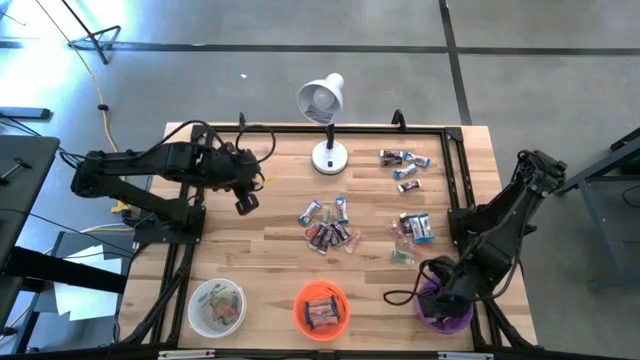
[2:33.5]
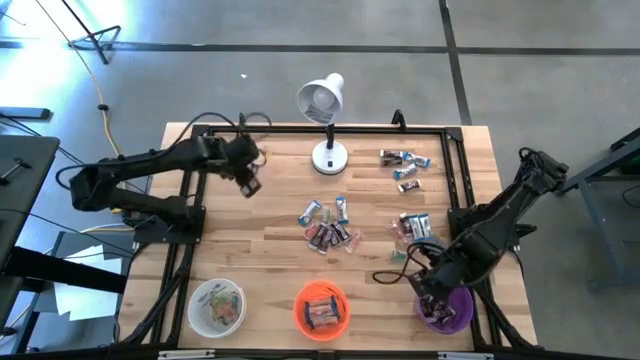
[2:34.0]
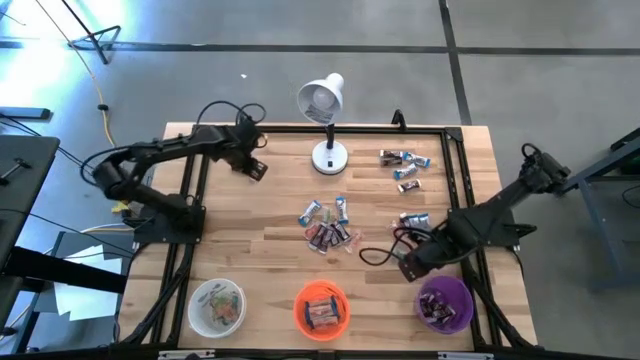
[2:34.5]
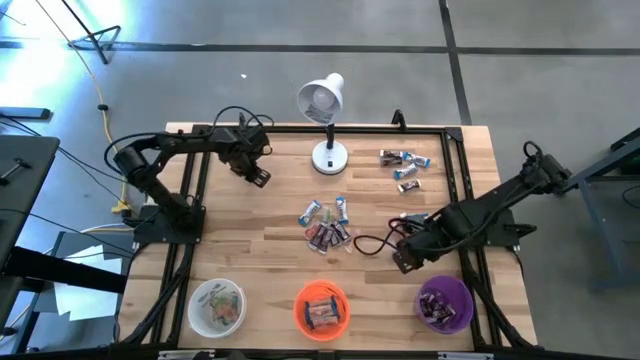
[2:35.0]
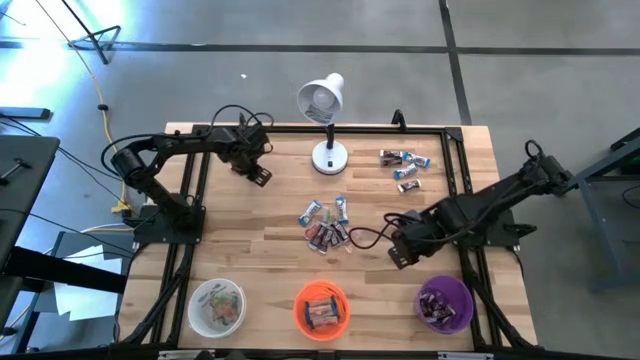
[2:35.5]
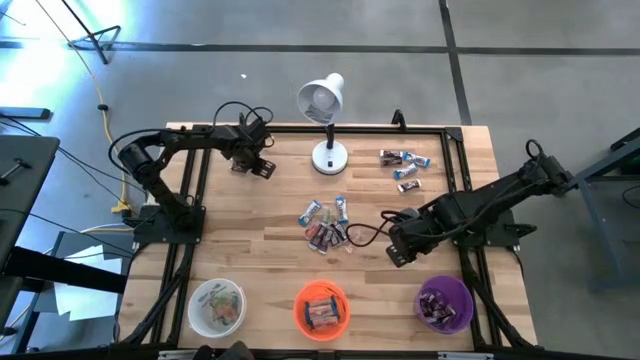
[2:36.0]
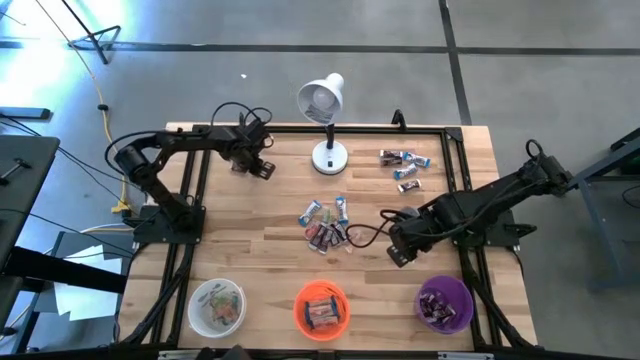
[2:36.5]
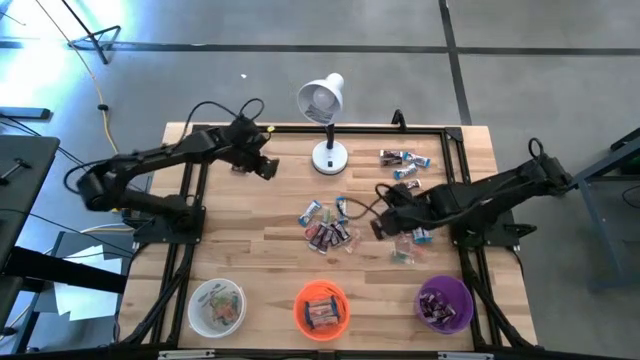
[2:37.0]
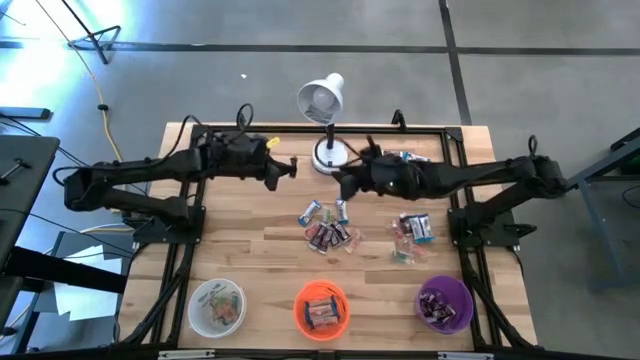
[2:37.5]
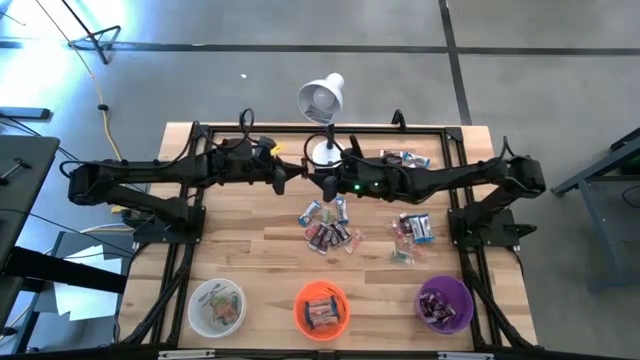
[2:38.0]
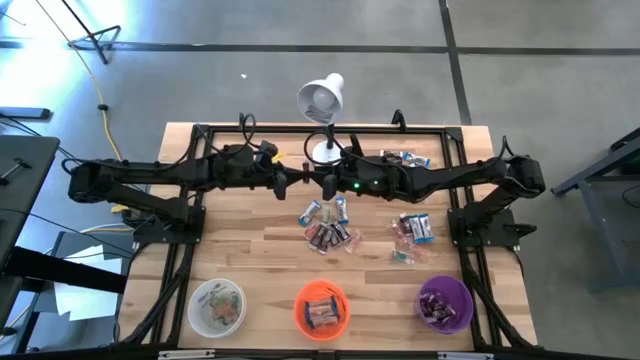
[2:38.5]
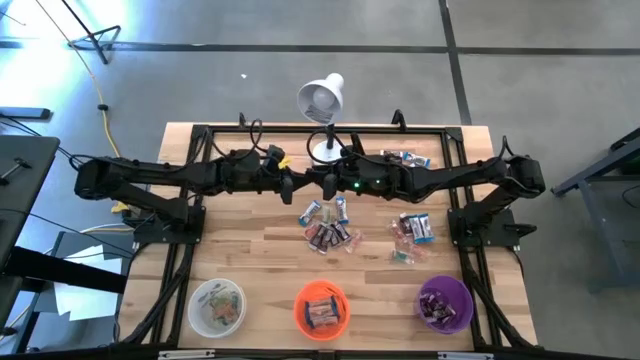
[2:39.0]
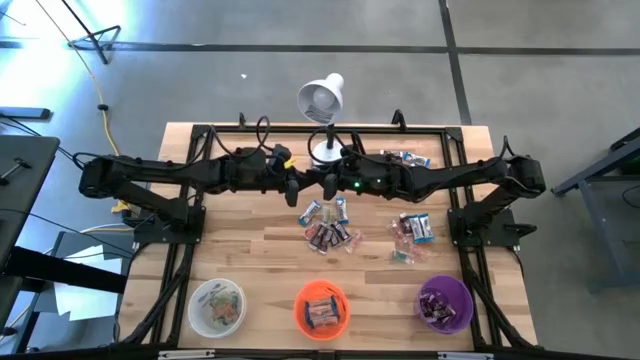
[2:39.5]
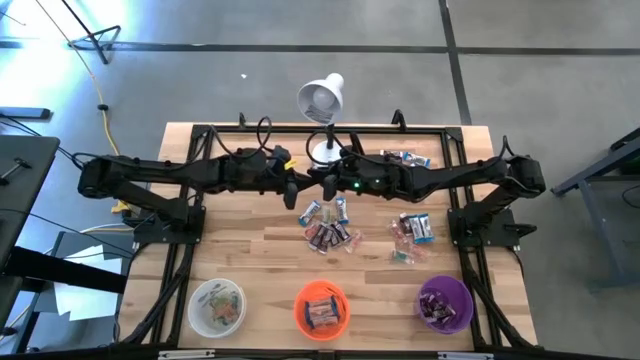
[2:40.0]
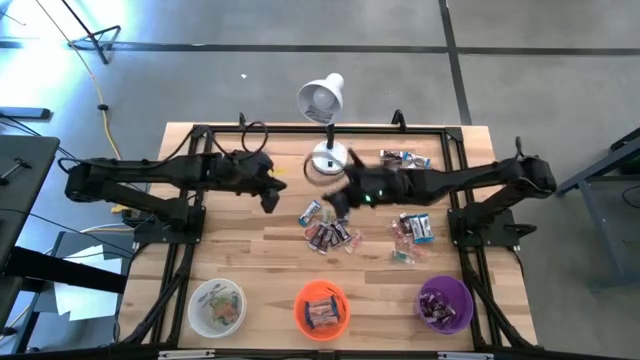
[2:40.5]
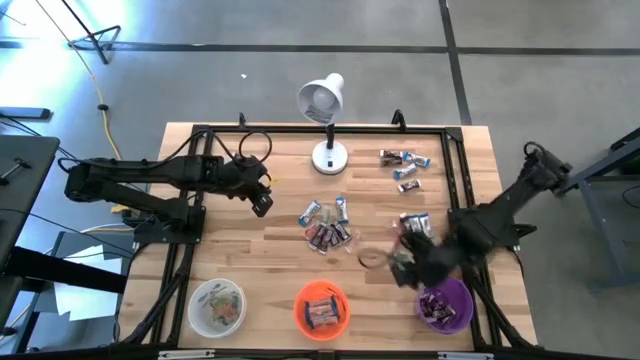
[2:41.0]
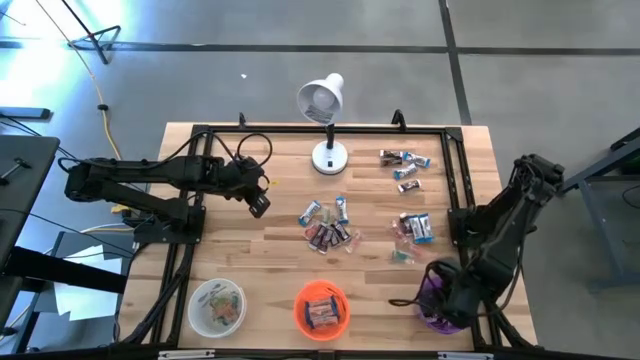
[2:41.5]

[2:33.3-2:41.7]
Task: Organize candy in baskets
Put the brown chocolate bar into the purple bucket

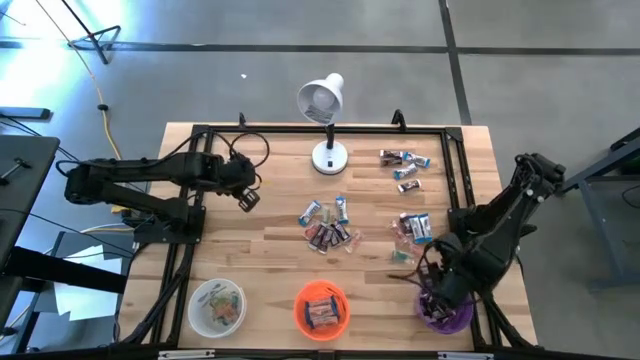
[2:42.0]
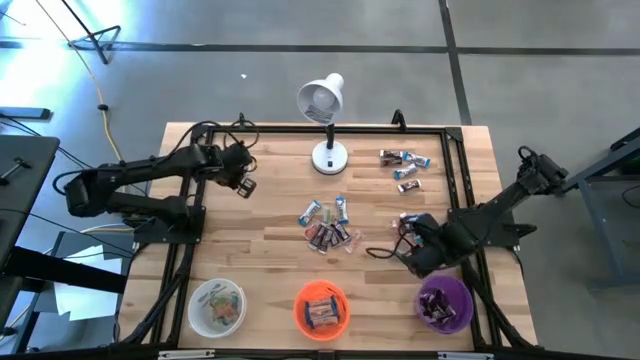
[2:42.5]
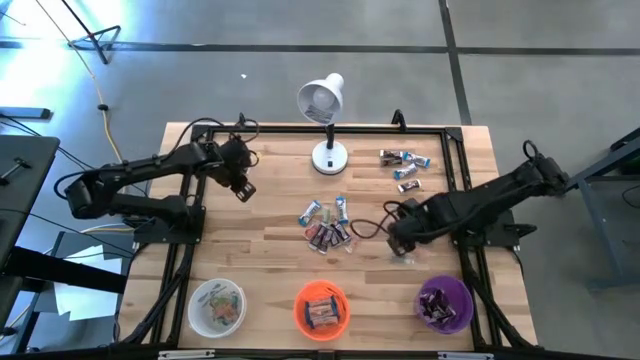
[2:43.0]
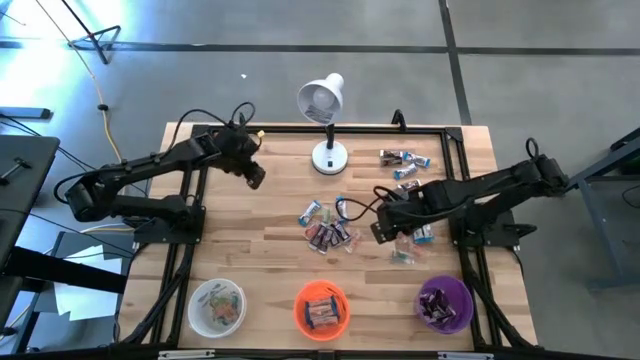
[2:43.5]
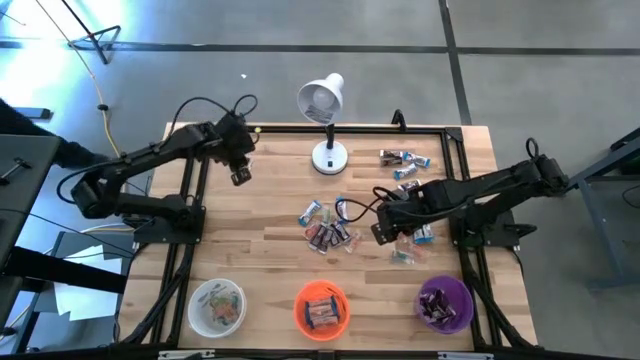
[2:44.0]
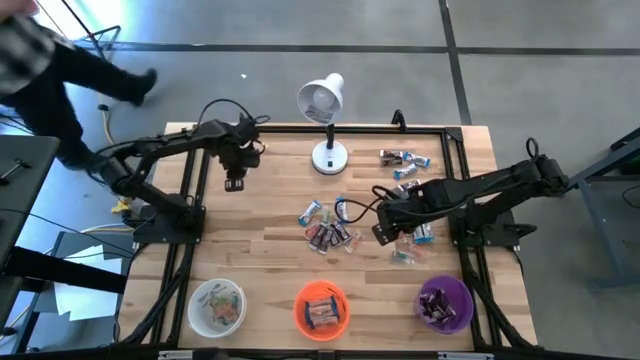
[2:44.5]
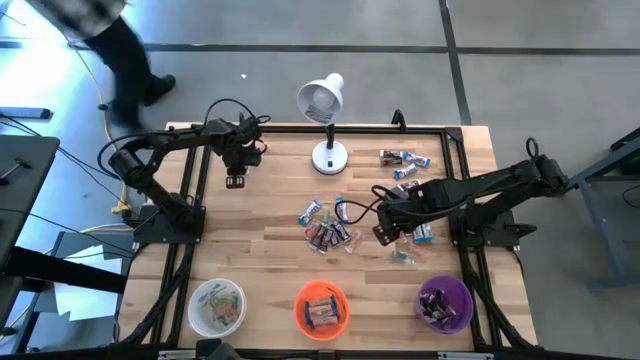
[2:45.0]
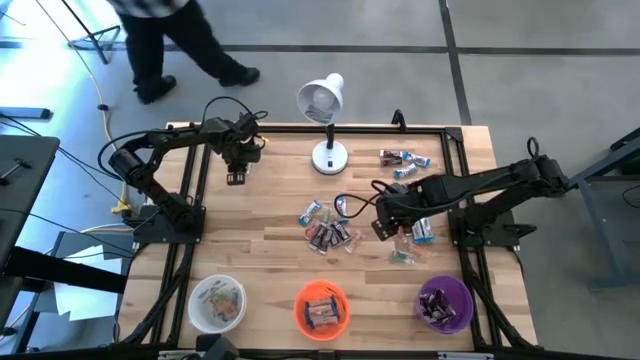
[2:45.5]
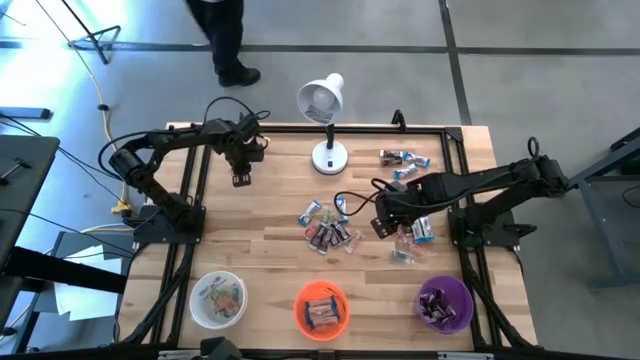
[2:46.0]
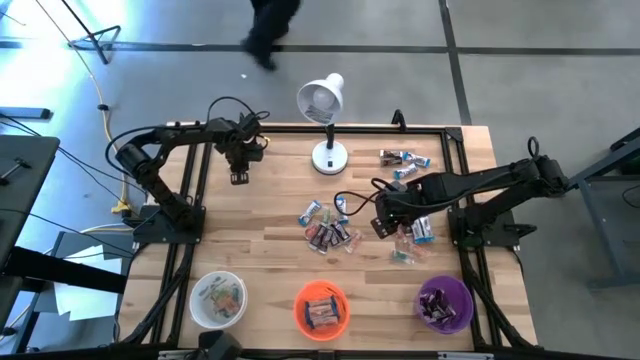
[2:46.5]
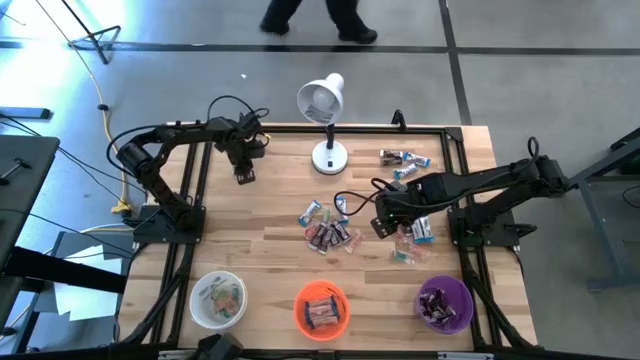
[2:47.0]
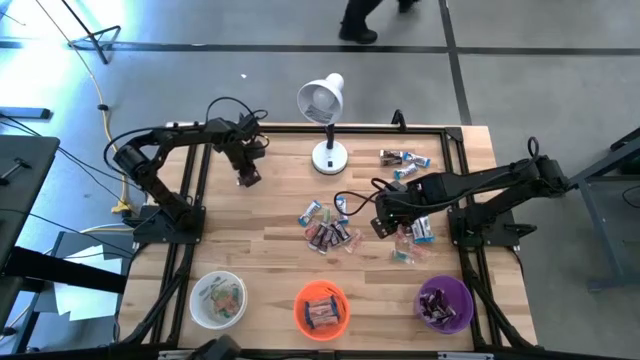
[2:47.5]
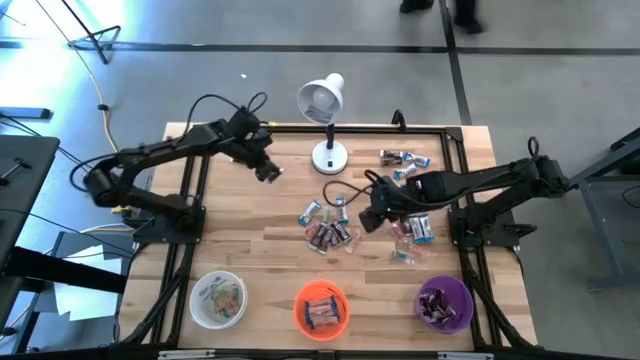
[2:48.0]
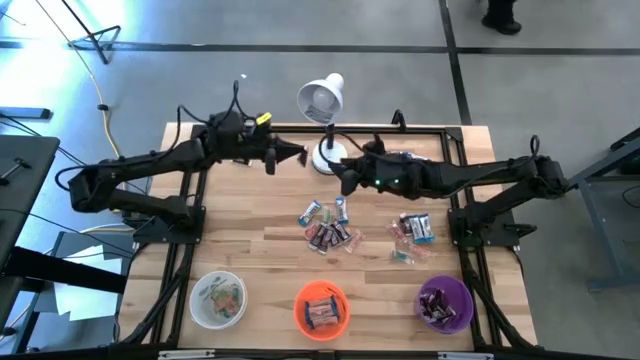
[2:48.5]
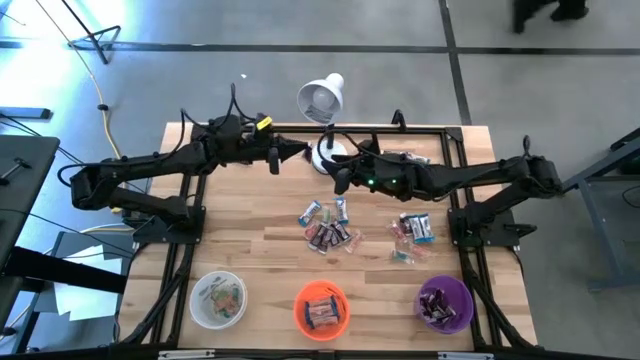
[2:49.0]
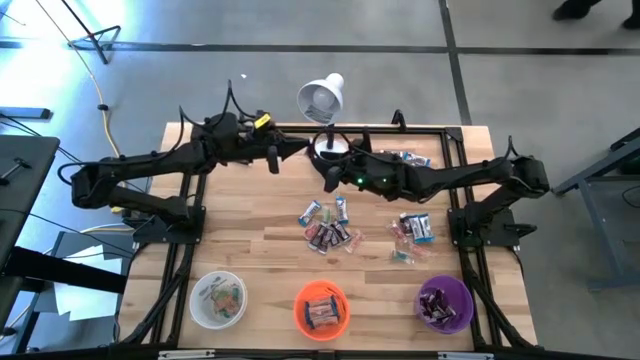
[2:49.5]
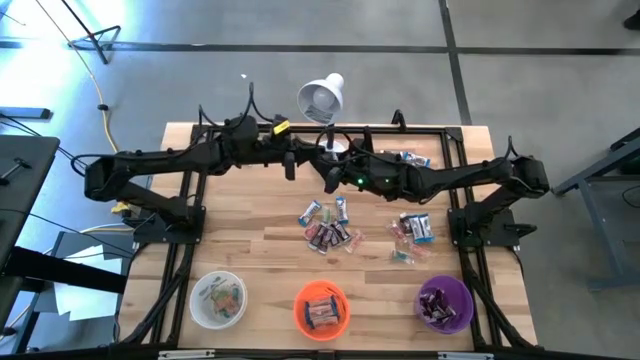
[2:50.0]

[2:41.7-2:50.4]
Put the brown chocolate bar into the purple bucket

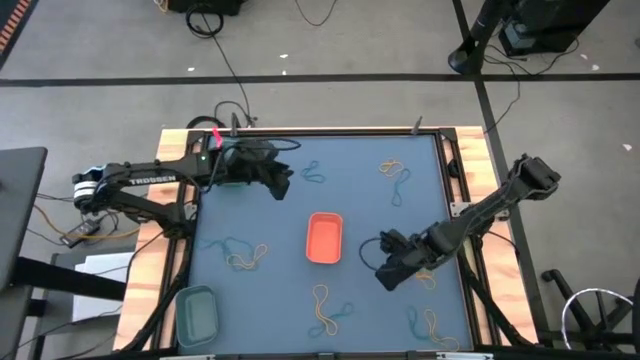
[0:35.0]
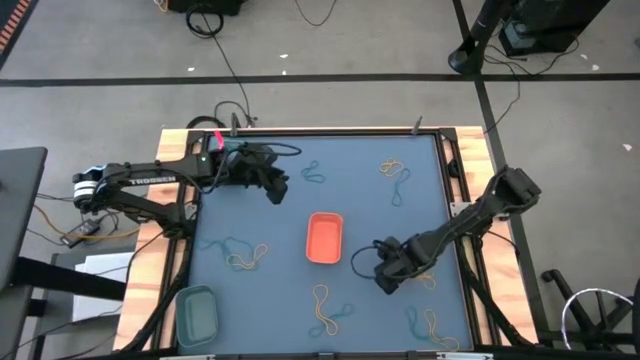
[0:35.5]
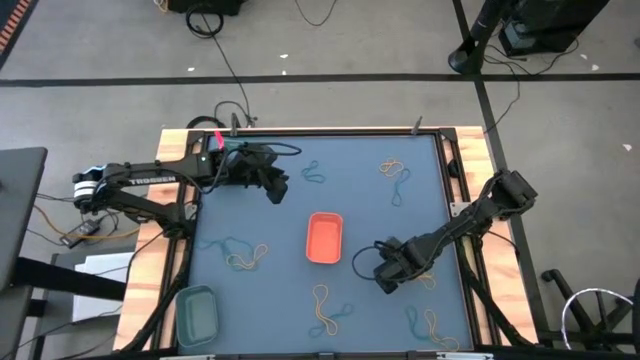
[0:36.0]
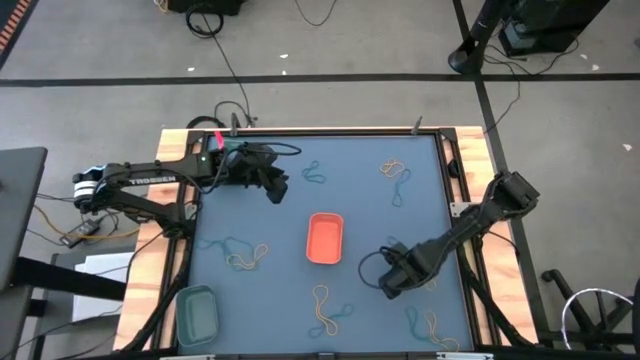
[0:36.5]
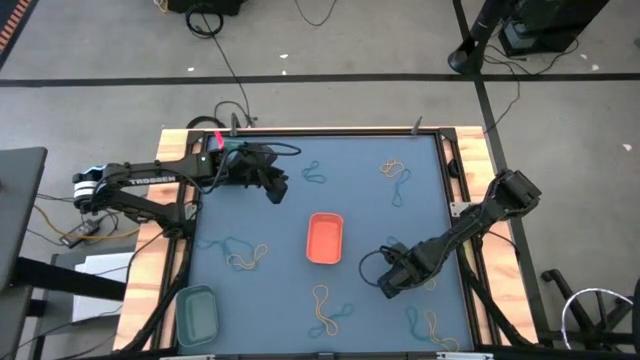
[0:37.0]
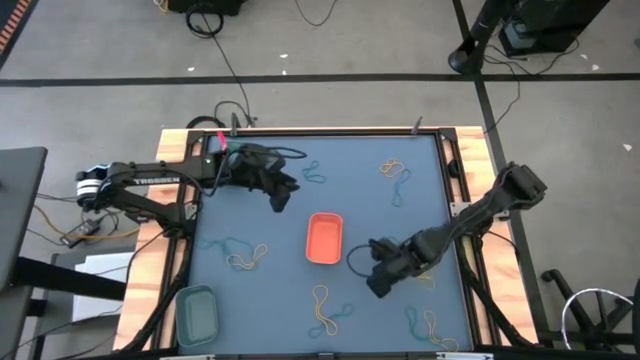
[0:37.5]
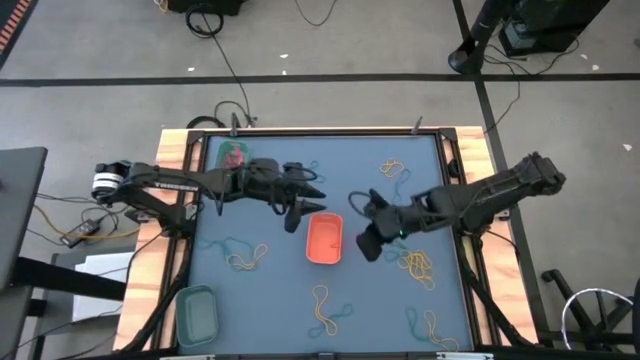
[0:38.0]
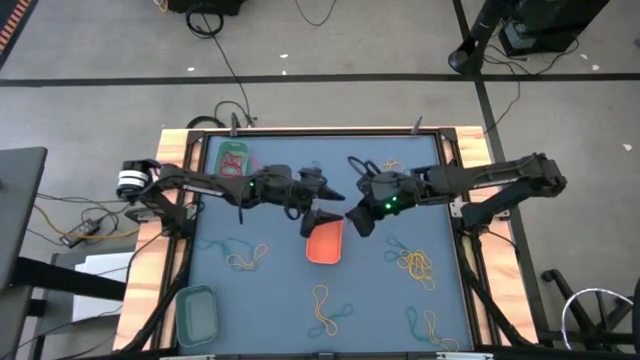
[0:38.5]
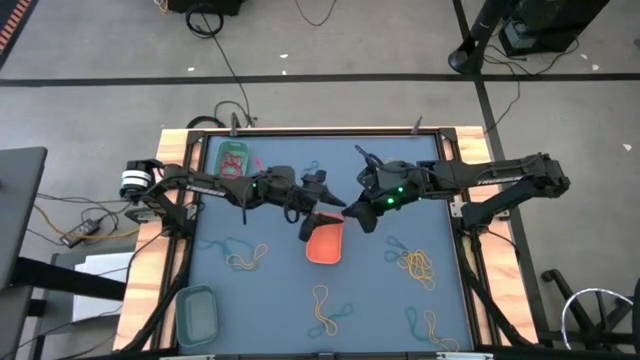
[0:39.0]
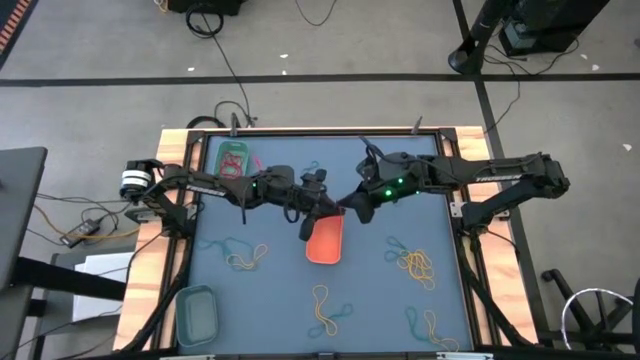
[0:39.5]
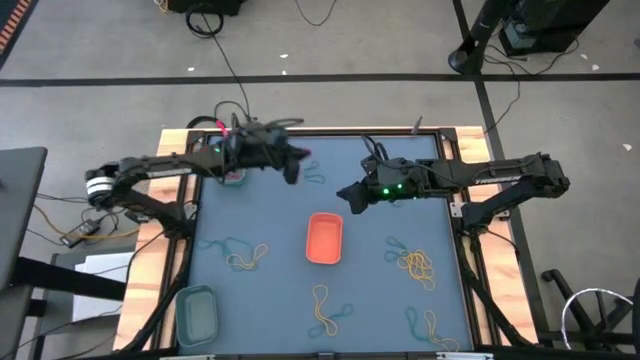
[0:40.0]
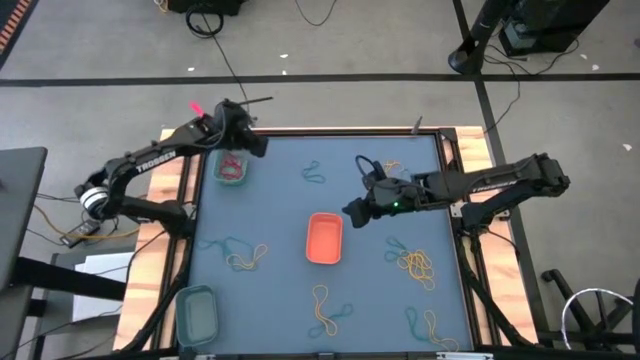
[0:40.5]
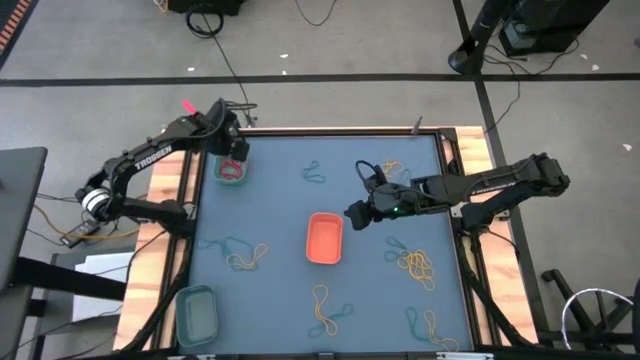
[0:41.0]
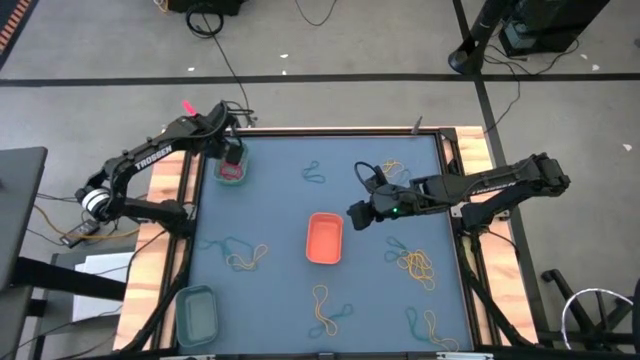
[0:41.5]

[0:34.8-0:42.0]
Task: Sort rubber bands into baskets
Put the red rubber band into the green bin
